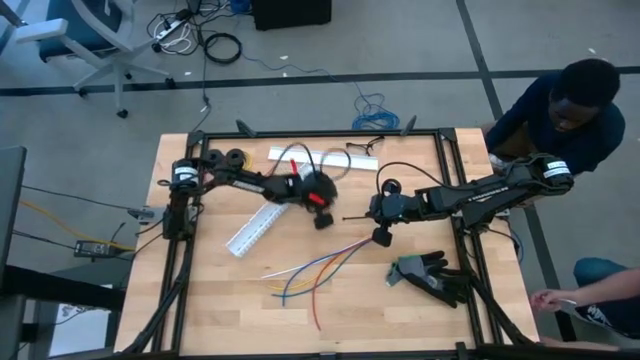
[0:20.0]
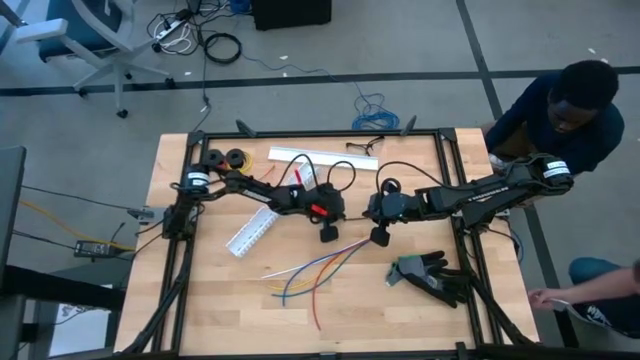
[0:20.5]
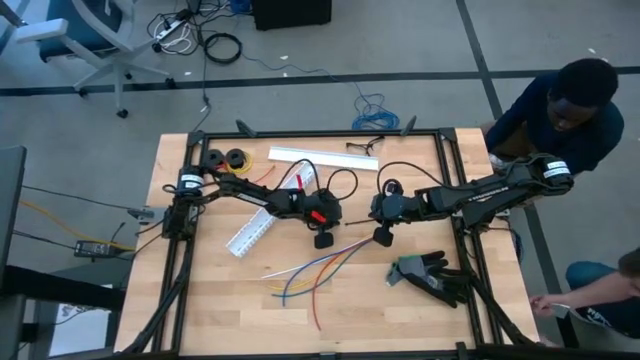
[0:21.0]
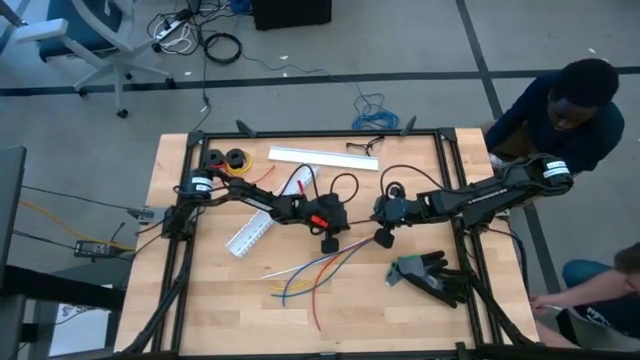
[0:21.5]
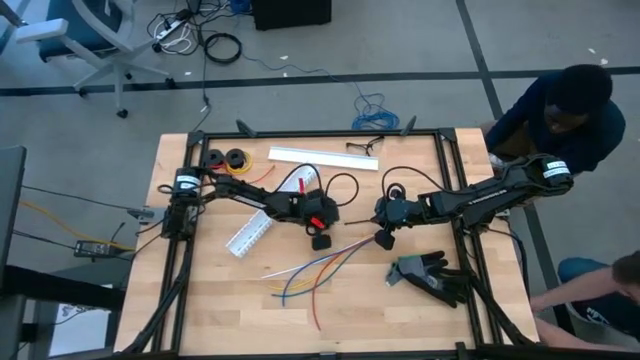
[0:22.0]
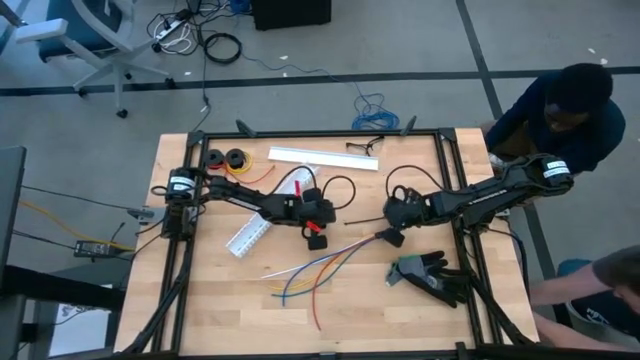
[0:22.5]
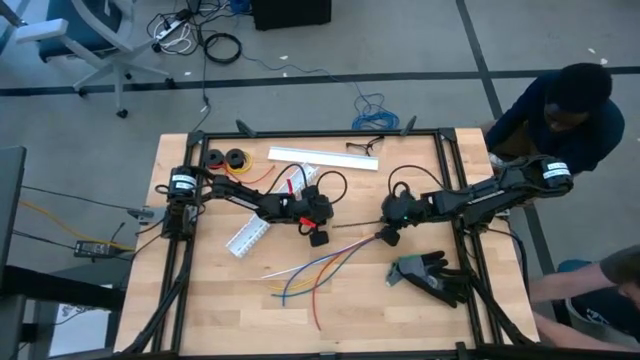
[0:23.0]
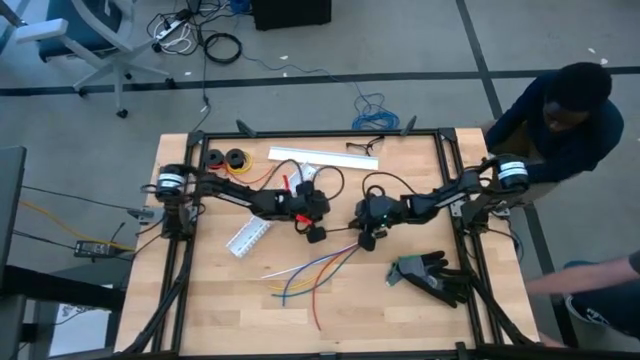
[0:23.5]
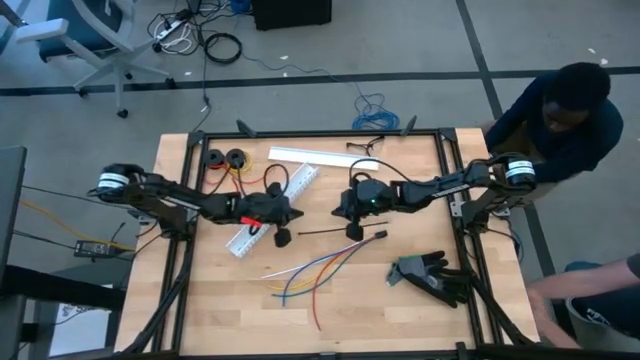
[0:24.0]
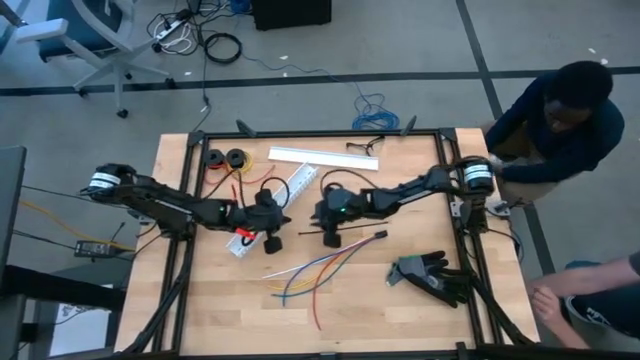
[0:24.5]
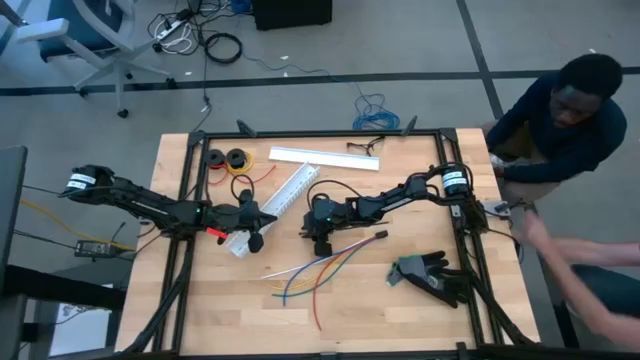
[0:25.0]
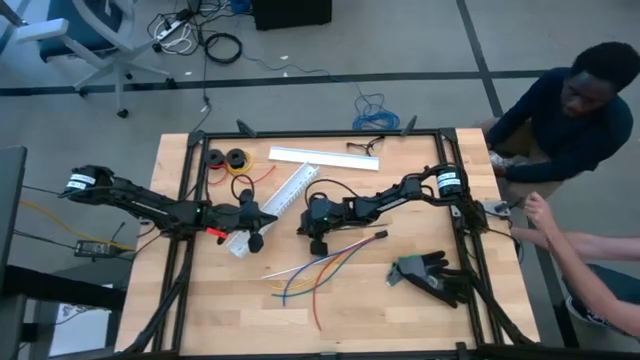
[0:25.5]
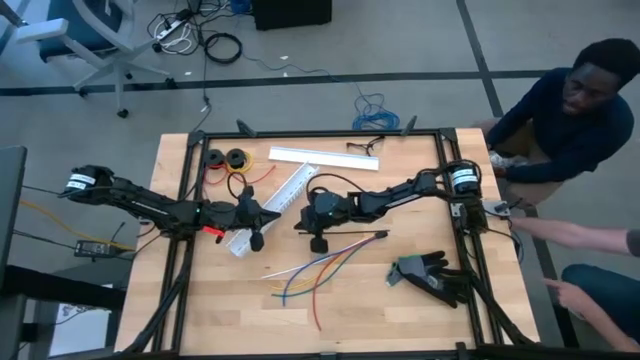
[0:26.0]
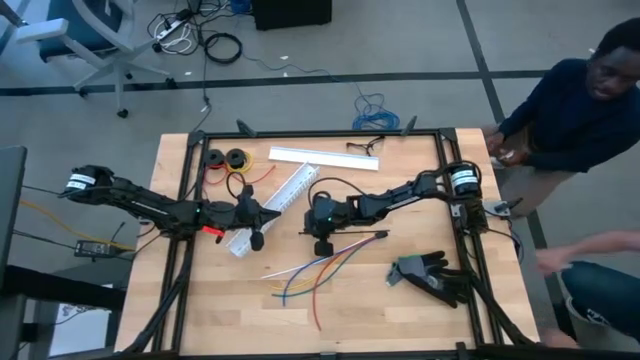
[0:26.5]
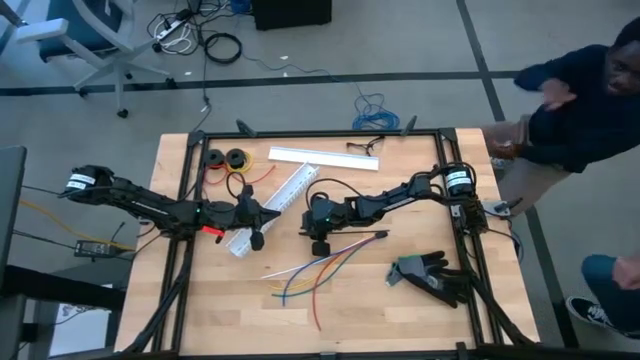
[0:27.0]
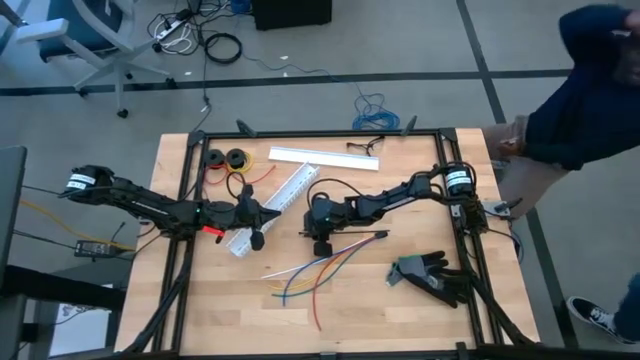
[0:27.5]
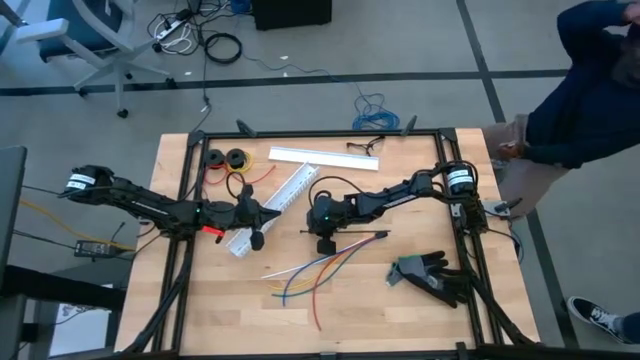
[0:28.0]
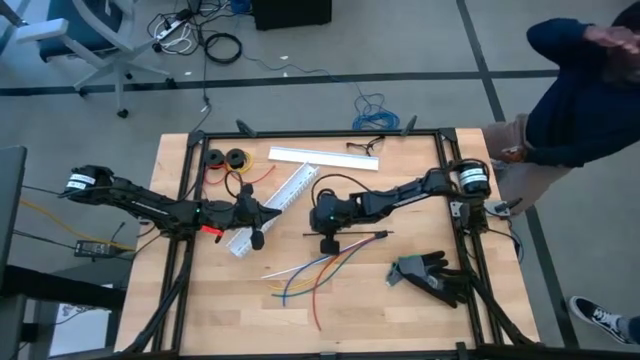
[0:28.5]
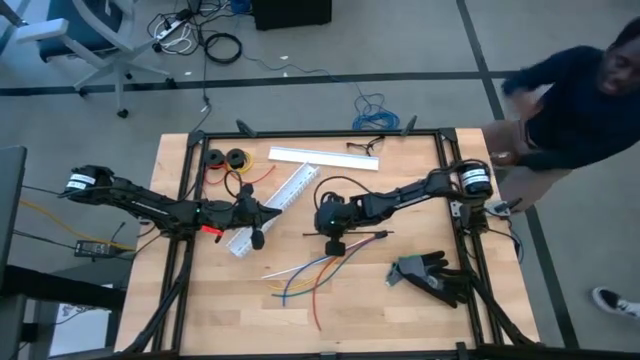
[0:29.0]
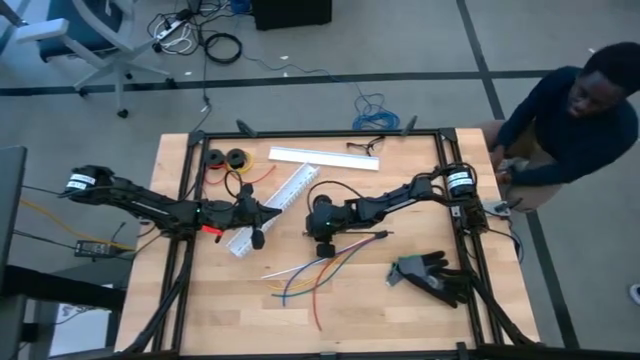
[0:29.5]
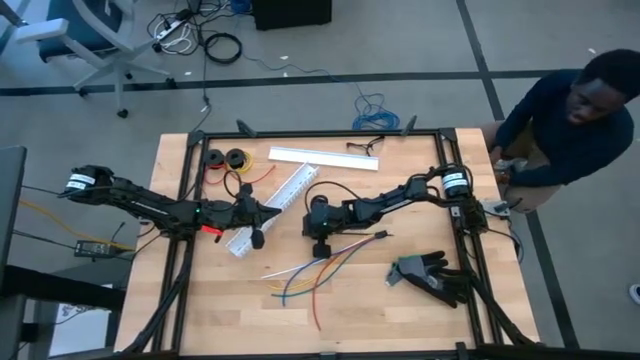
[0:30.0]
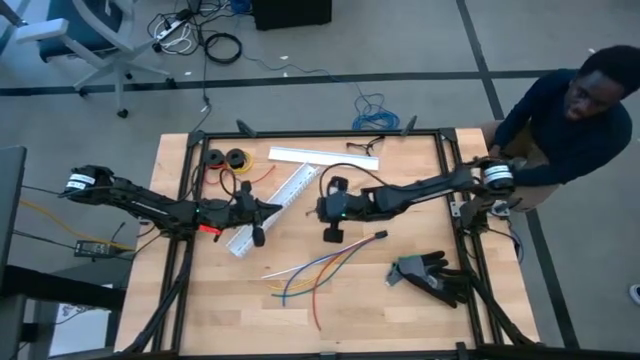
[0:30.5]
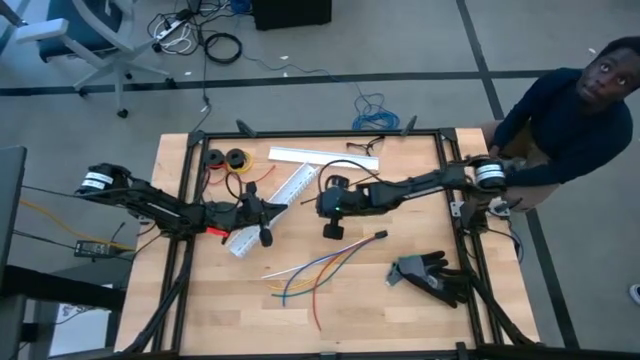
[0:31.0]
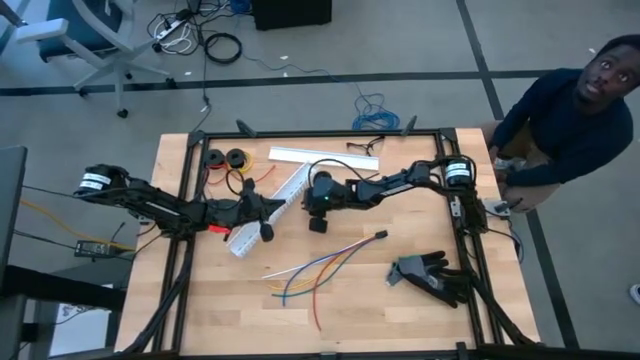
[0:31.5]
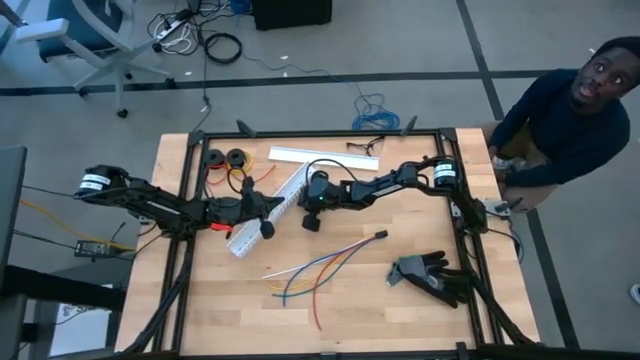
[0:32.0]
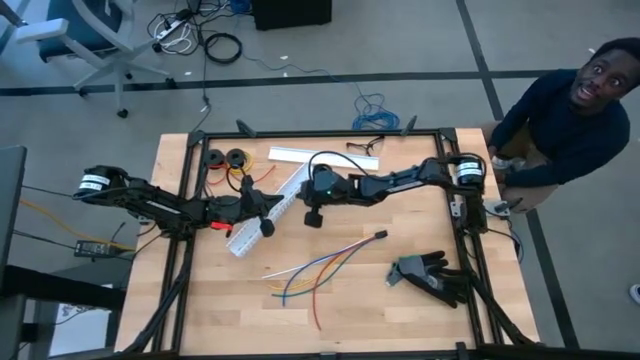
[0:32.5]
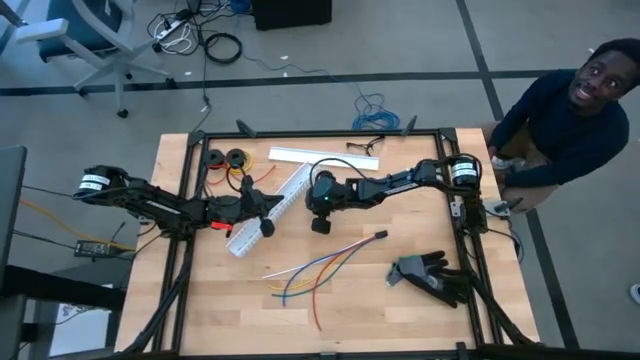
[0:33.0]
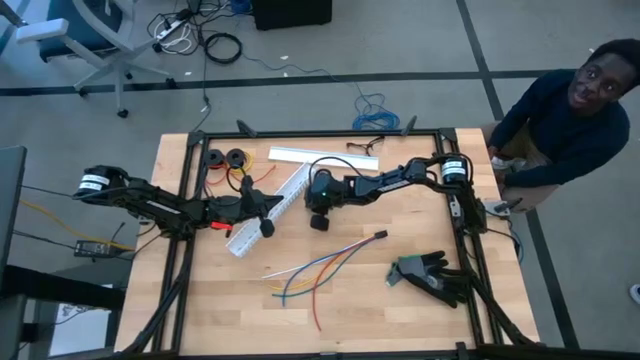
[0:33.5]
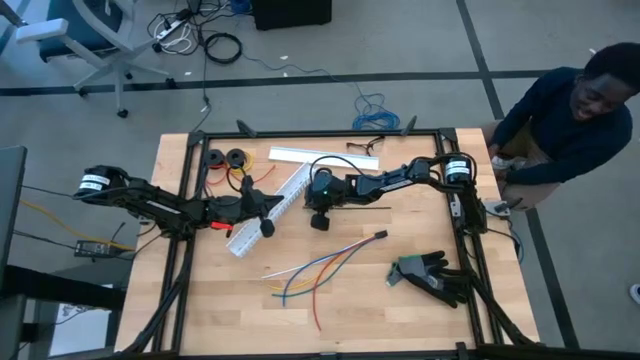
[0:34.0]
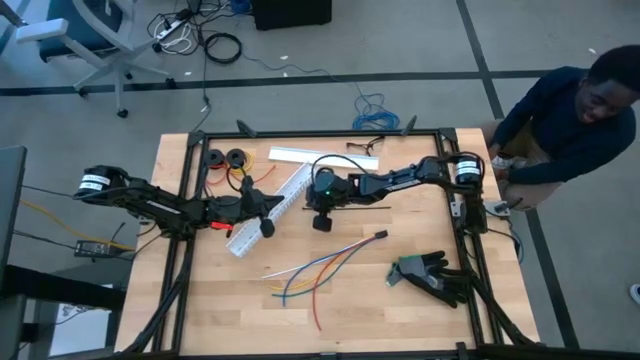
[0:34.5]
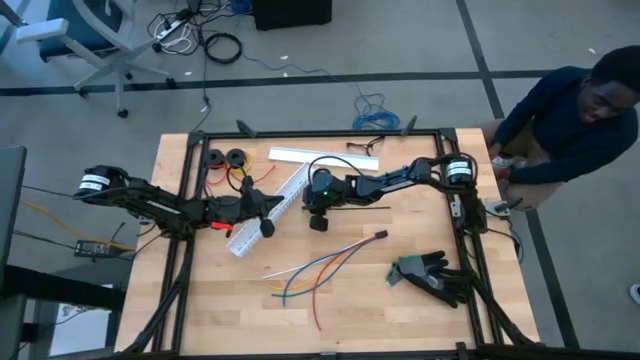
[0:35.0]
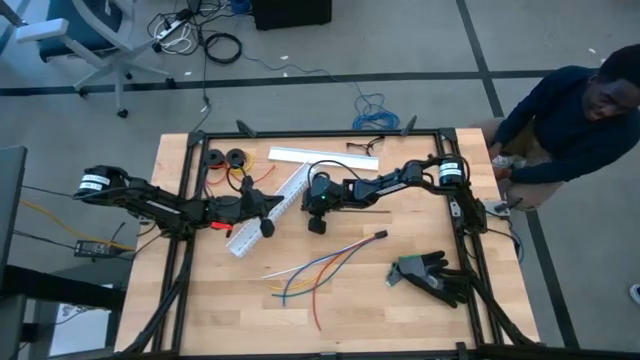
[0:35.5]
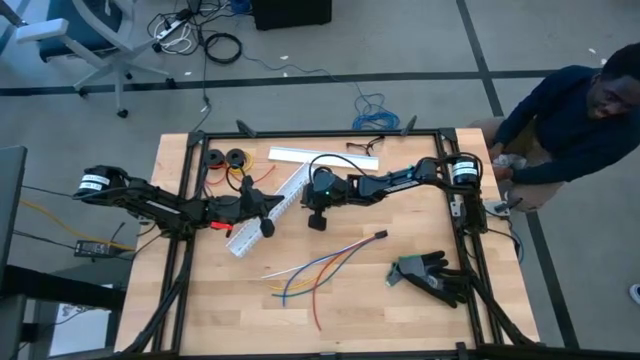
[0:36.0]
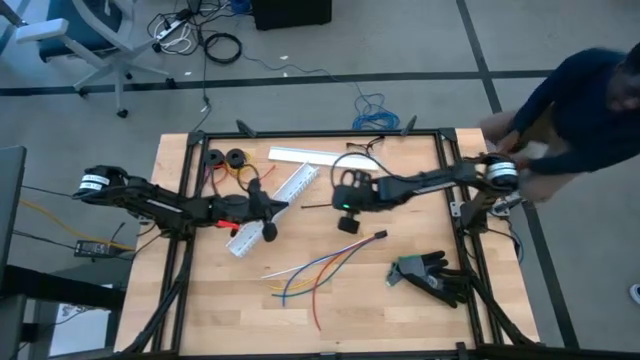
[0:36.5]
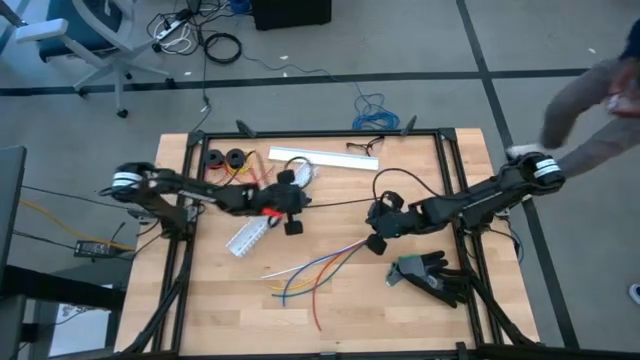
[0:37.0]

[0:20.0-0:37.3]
Task: Ziptie cables
Wrap the black zip tie on the cables

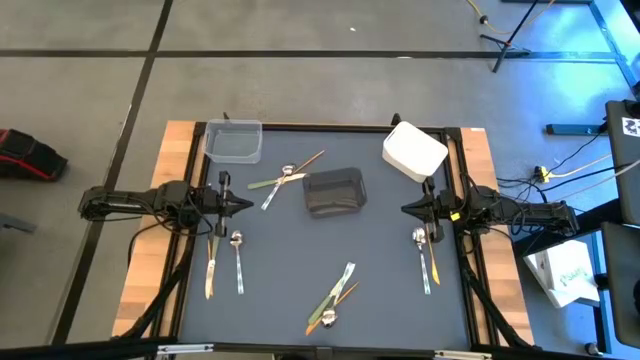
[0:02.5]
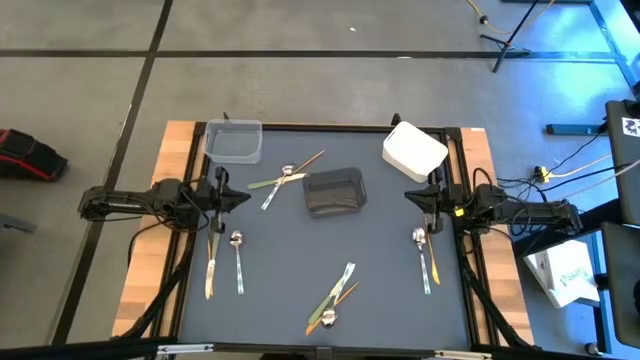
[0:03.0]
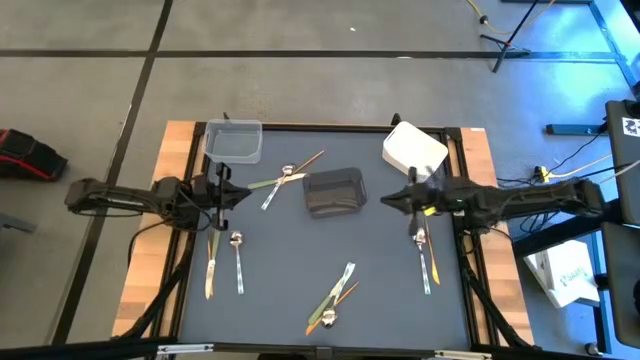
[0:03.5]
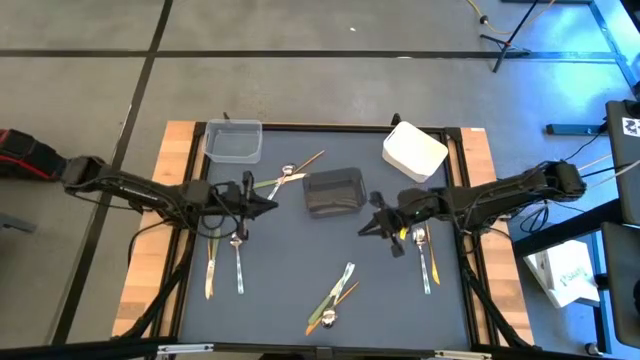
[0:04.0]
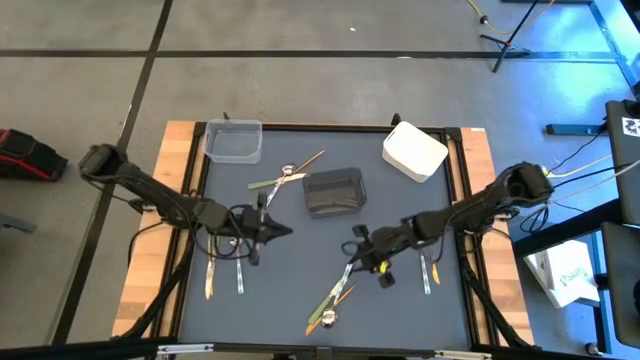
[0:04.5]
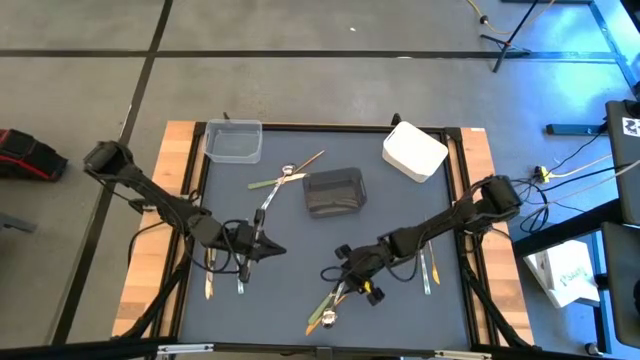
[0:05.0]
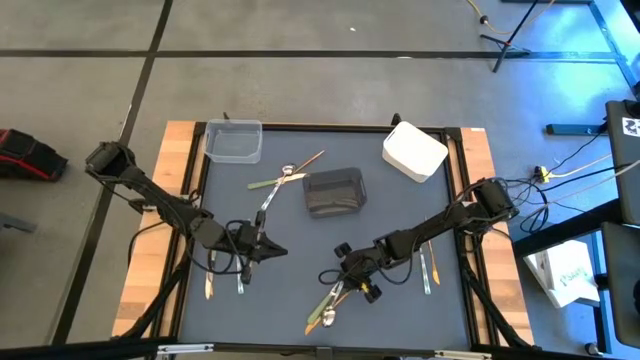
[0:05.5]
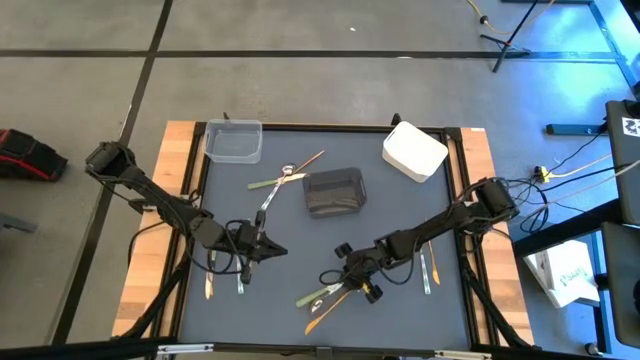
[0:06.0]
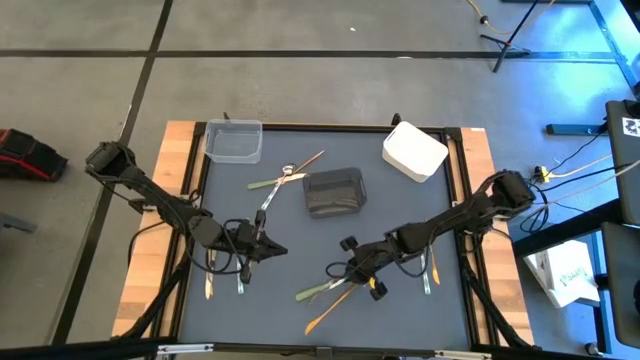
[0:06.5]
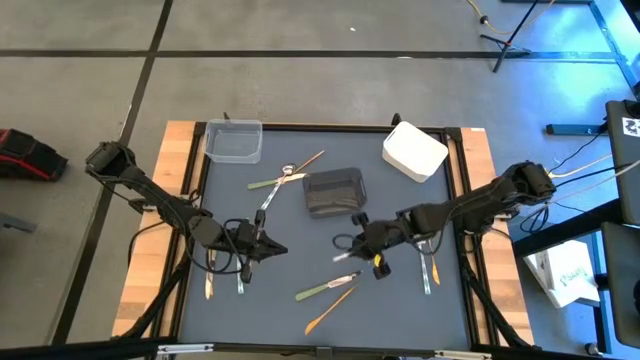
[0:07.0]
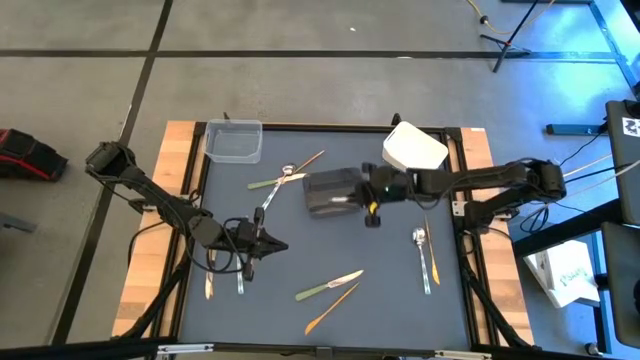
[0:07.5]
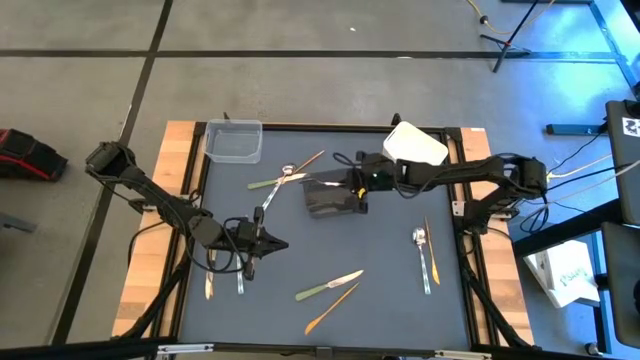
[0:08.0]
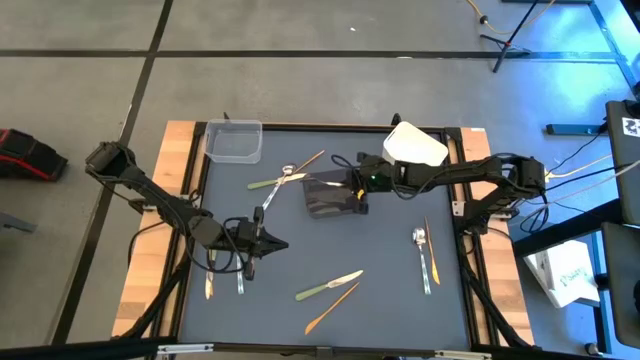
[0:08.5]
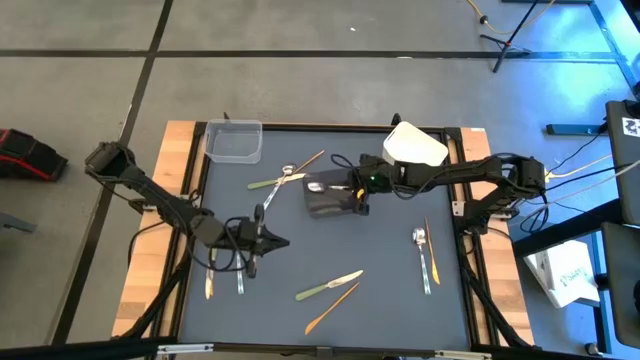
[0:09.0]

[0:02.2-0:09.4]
Task: Sort silverware by color (type)
Put the bottom blue spoon into the black bin
